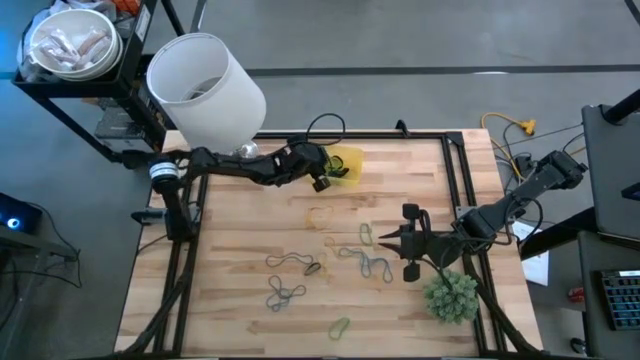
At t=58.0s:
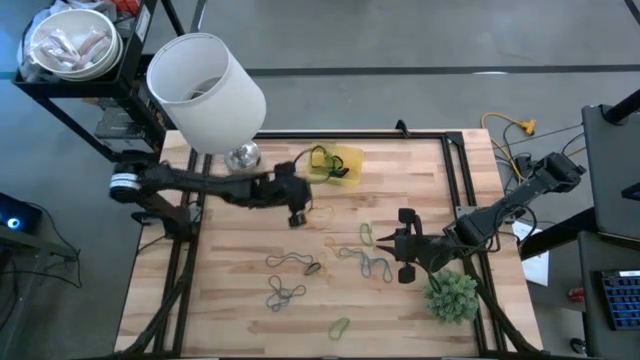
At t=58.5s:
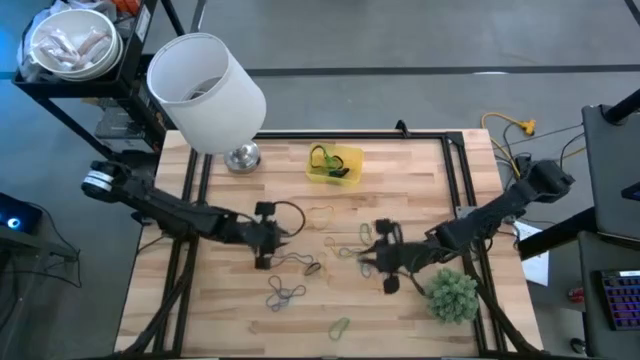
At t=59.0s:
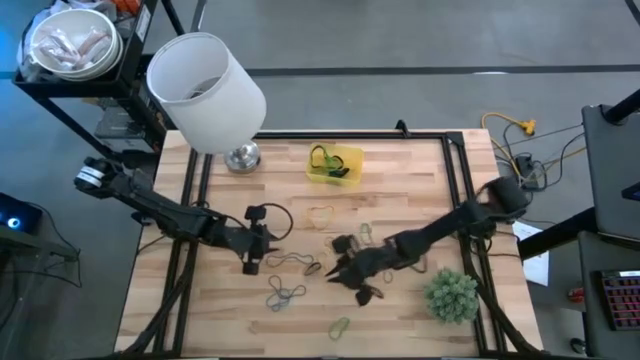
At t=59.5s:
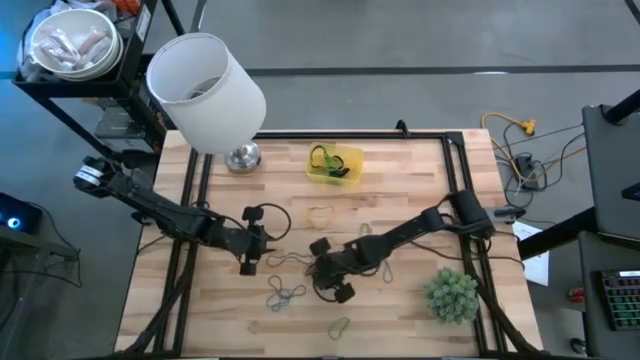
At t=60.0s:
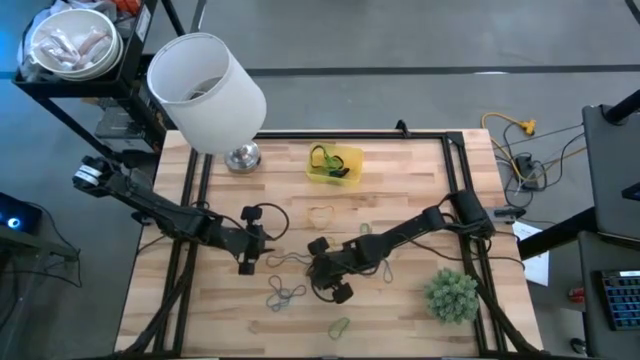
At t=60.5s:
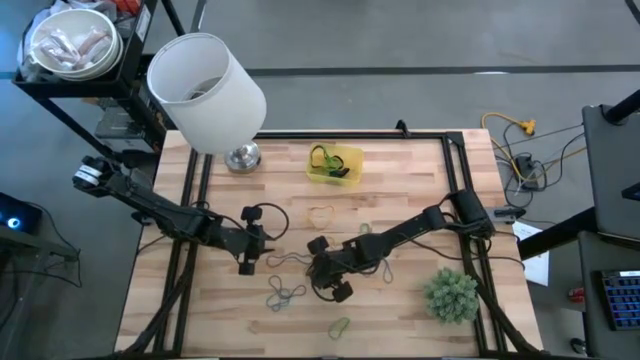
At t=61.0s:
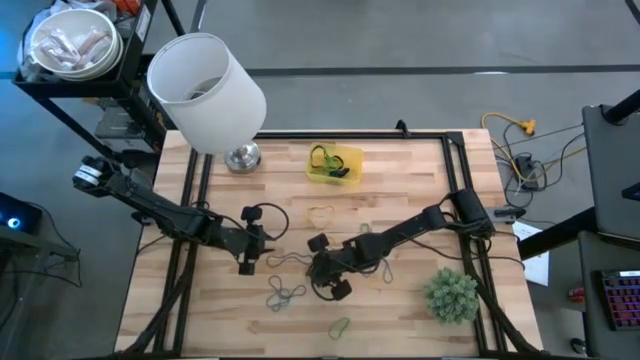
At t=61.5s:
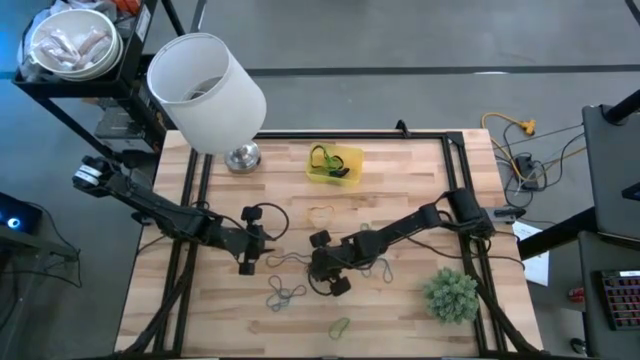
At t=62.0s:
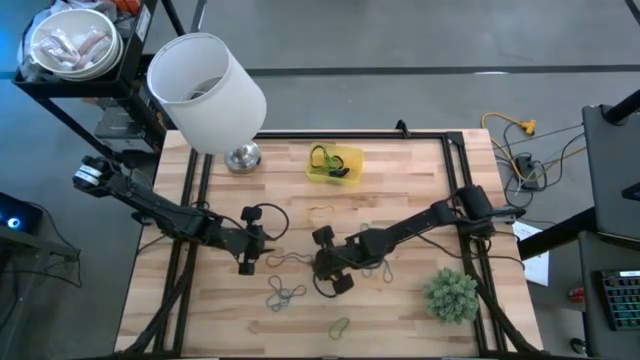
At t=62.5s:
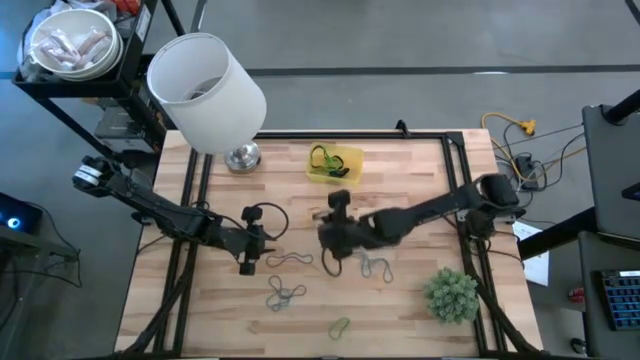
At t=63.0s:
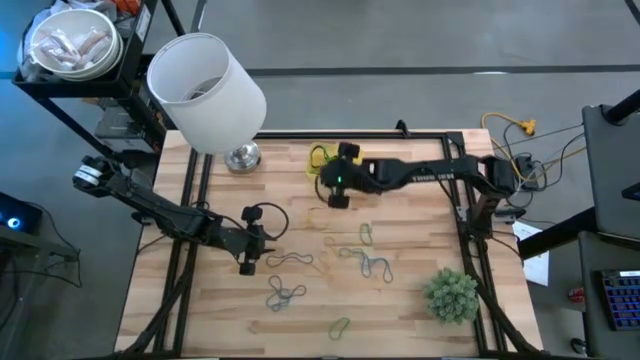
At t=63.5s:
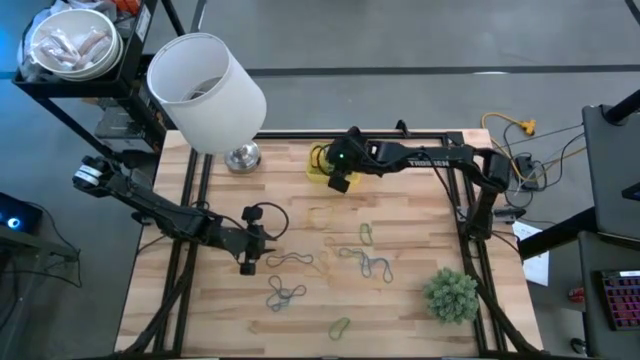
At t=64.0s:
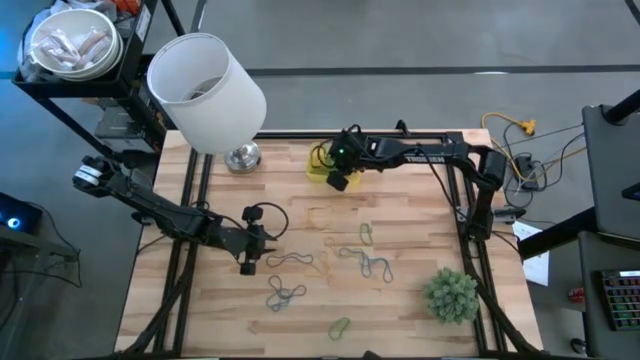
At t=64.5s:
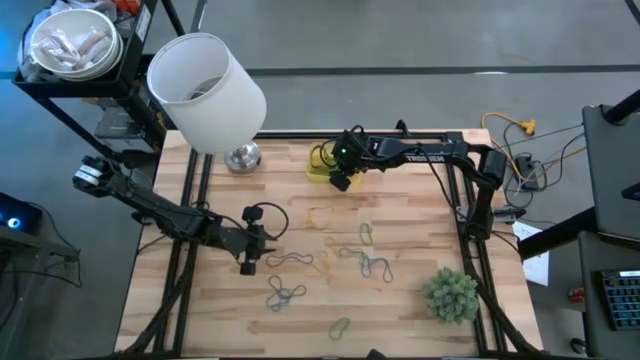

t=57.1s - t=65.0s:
Task: Pick and place rubber bands into bin
Put the black rubber band into the yellow bin

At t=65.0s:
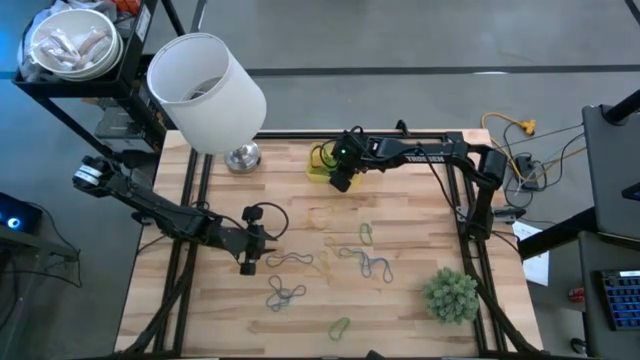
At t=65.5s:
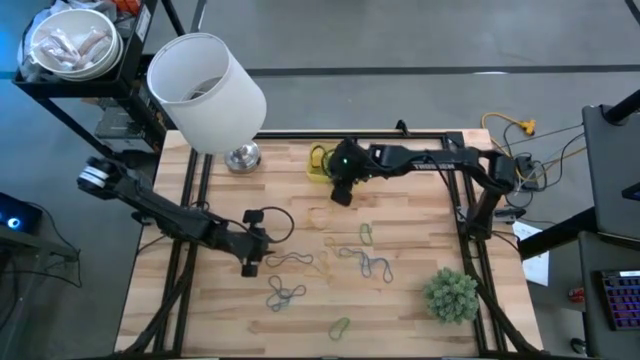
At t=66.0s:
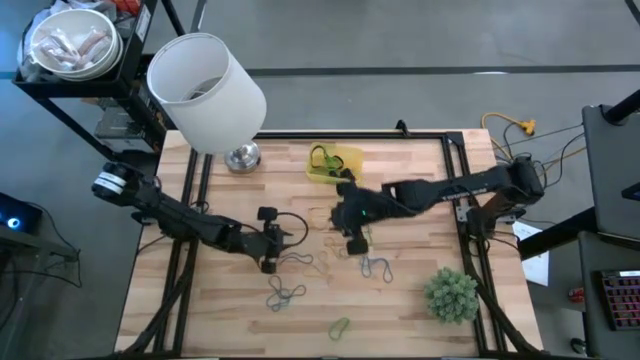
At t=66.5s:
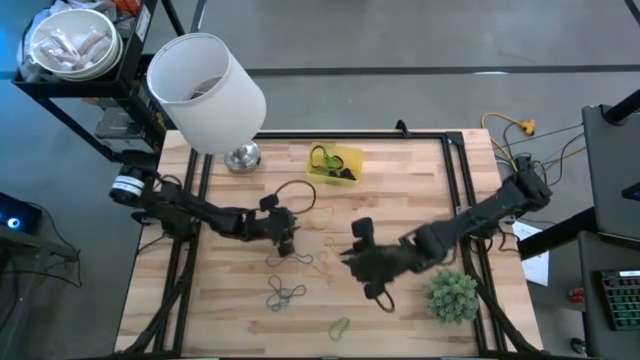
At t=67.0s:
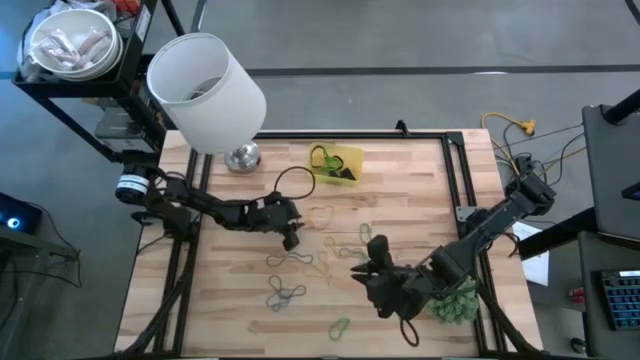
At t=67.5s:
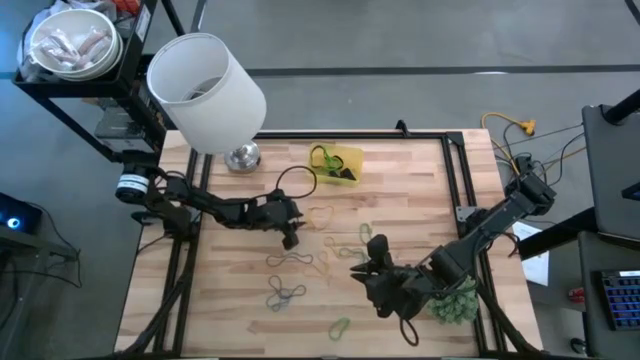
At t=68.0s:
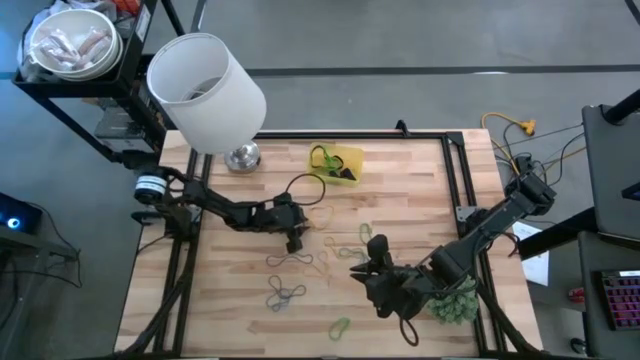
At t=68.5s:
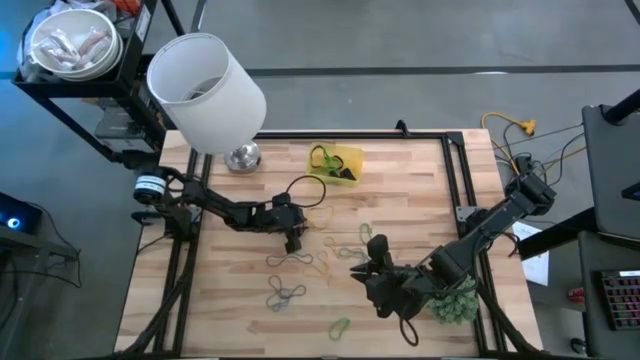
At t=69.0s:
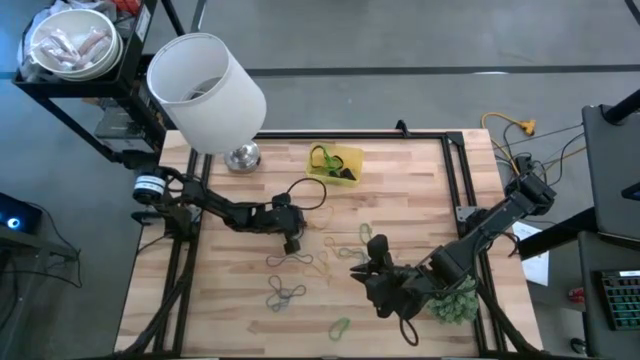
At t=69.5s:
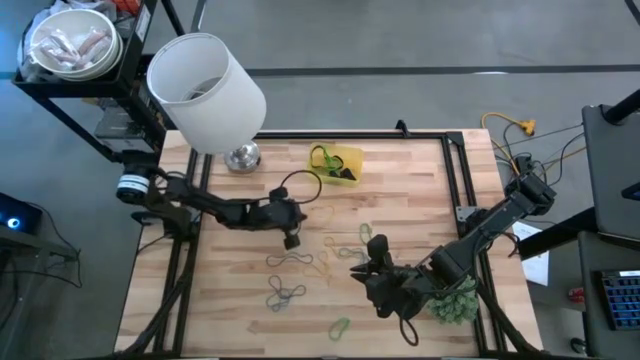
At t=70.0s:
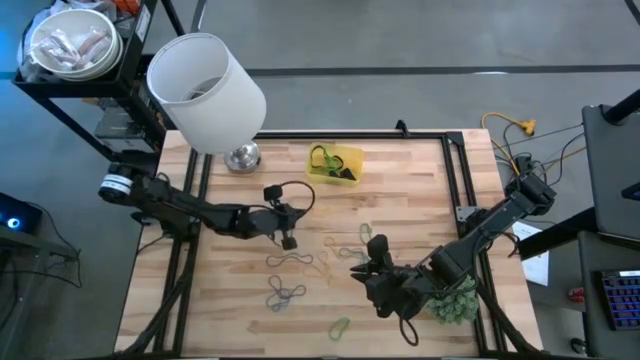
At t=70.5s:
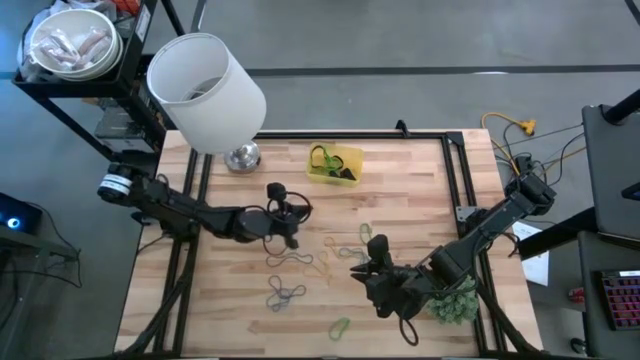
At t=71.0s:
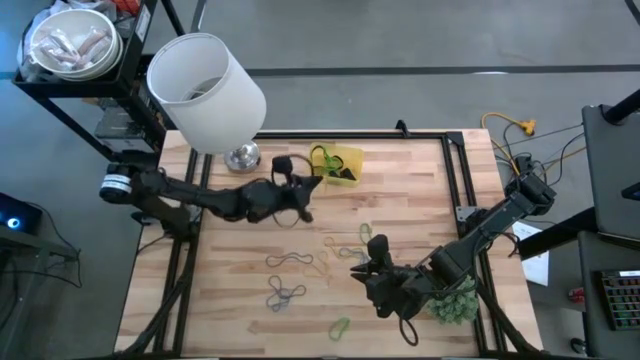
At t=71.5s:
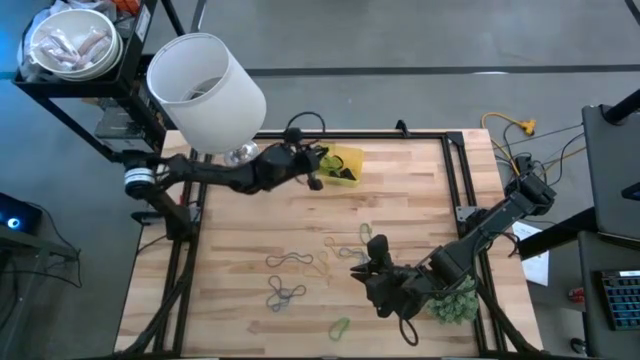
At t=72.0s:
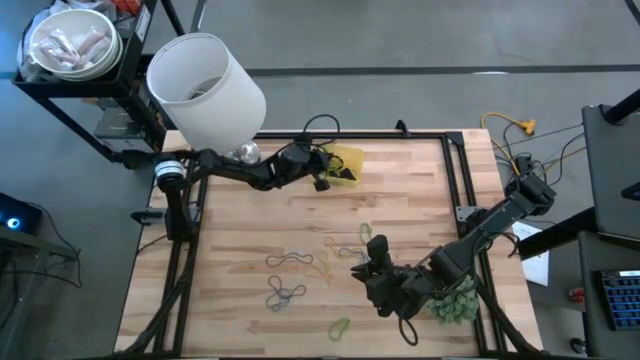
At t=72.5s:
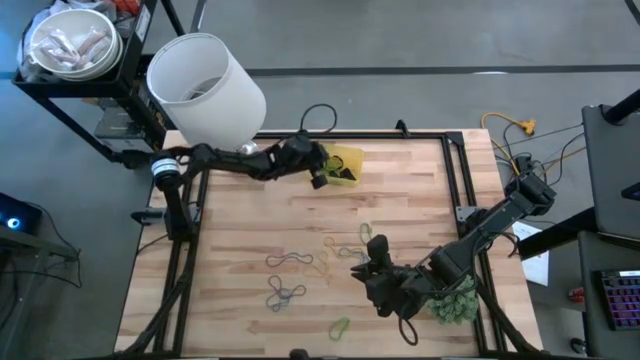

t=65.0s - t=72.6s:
Put the yellow rubber band into the yellow bin

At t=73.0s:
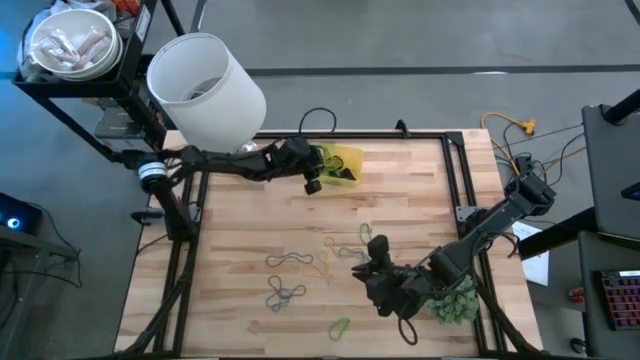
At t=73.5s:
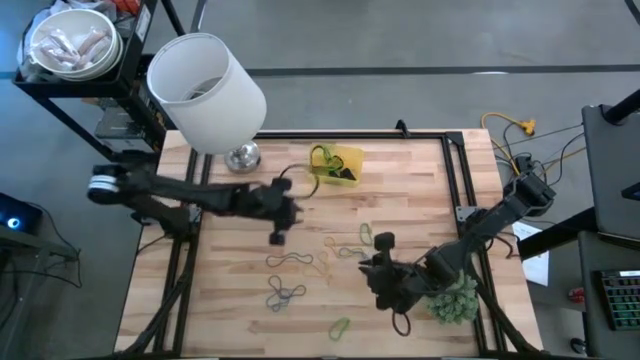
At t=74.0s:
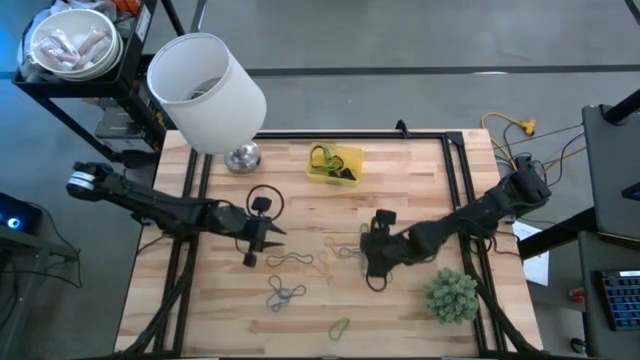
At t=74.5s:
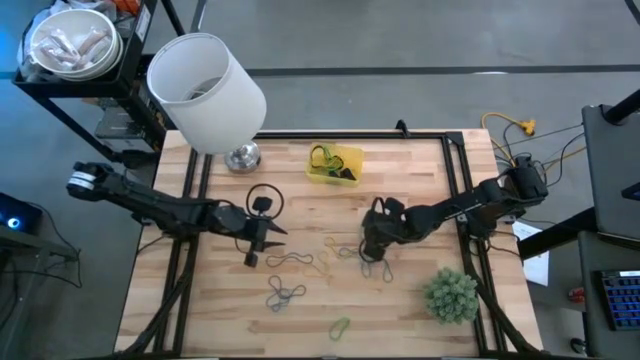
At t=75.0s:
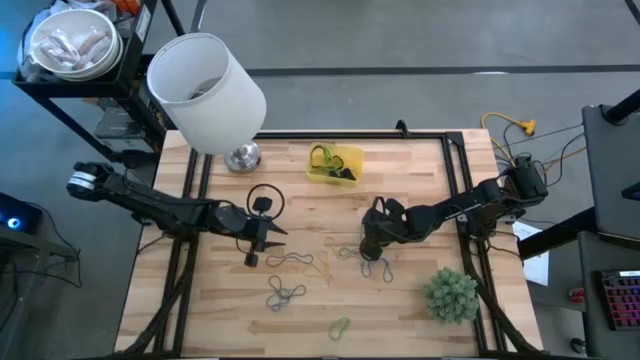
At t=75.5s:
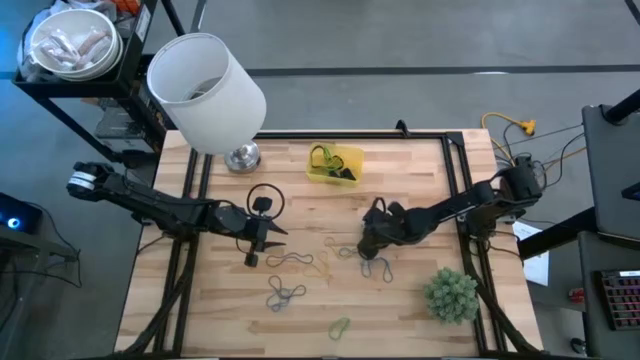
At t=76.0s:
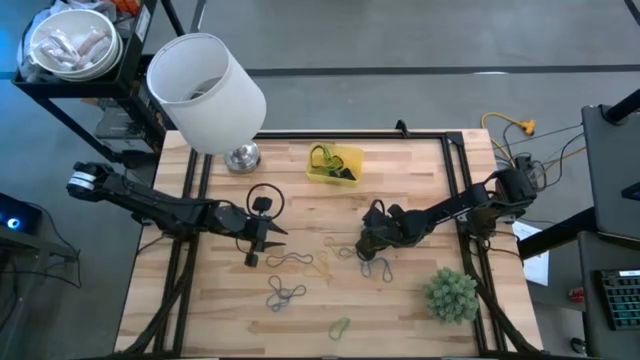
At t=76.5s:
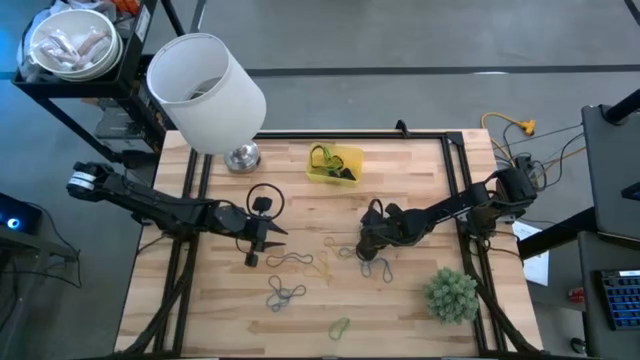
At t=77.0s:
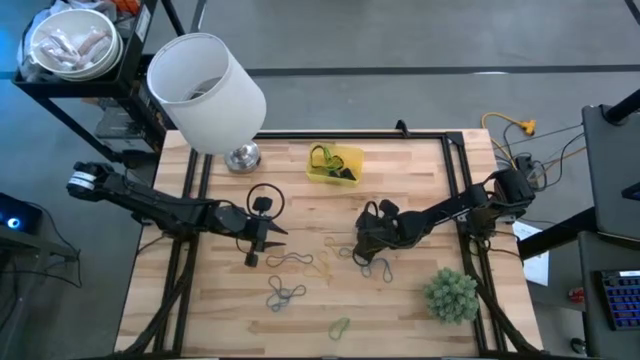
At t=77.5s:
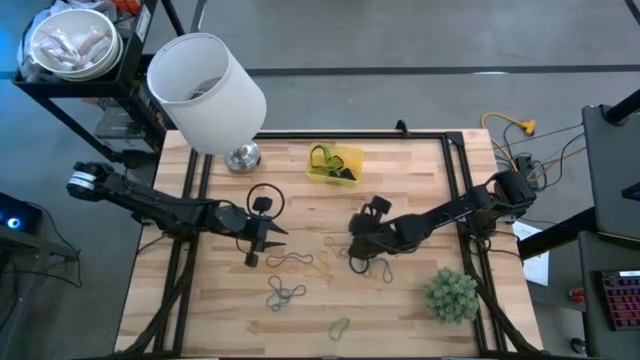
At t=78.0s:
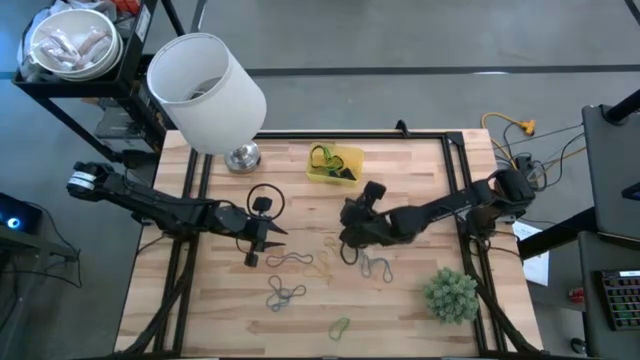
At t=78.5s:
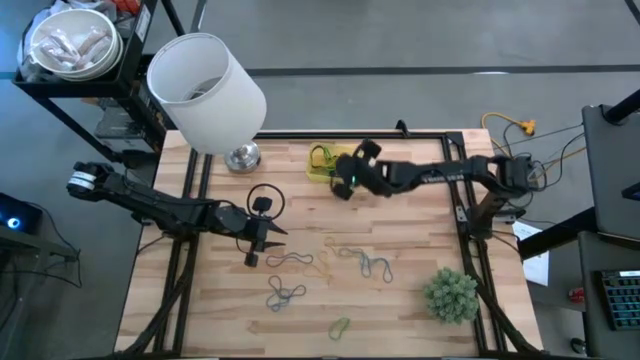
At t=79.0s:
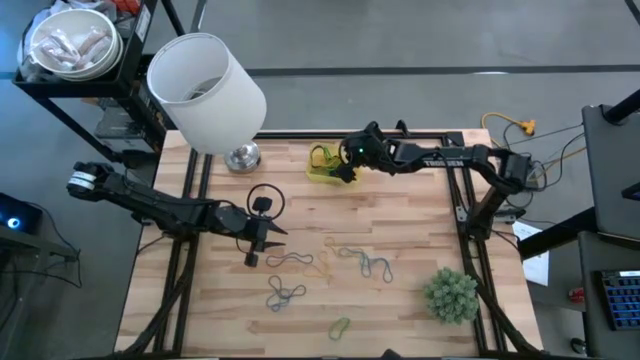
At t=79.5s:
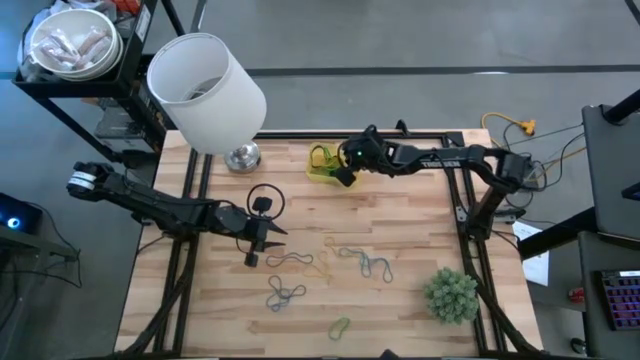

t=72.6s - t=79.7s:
Put the green rubber band into the yellow bin
